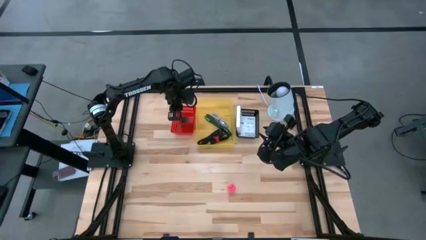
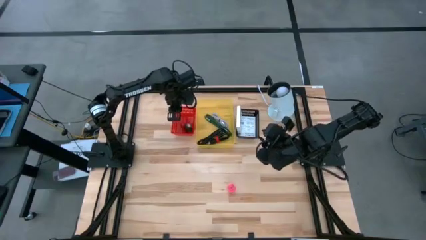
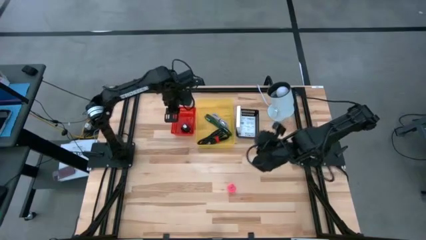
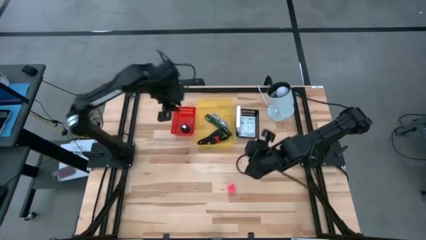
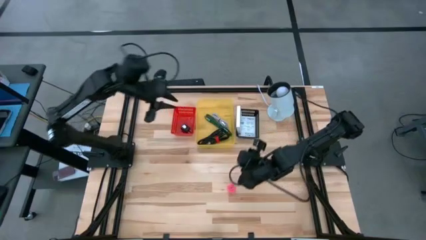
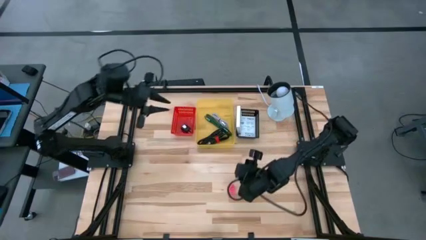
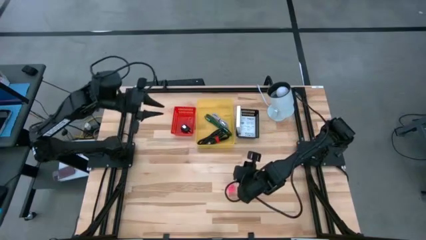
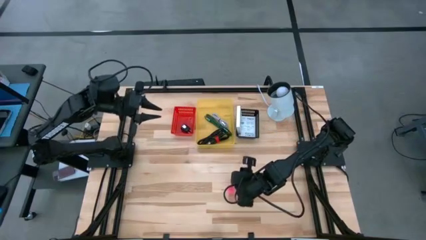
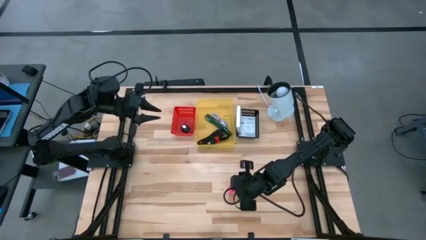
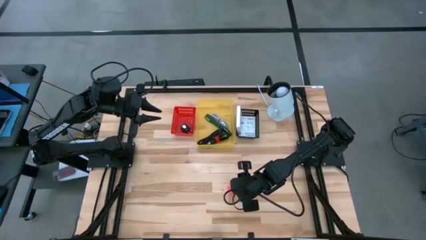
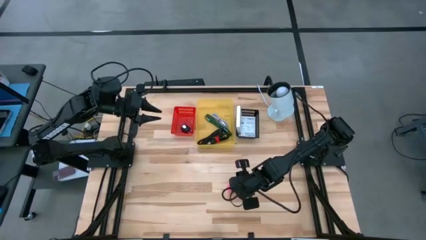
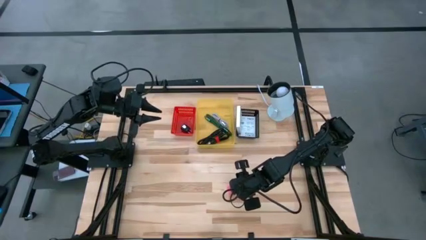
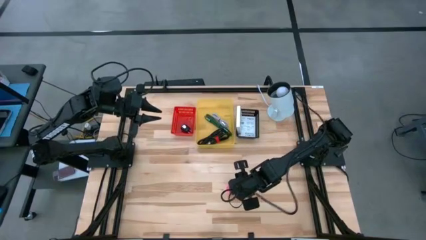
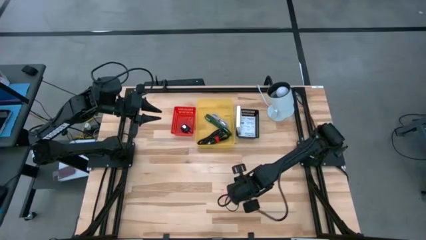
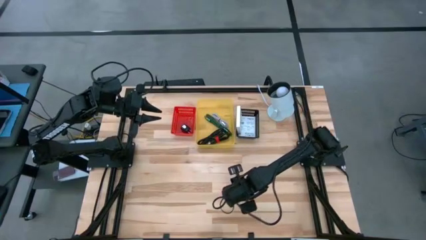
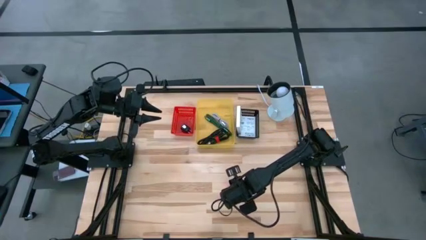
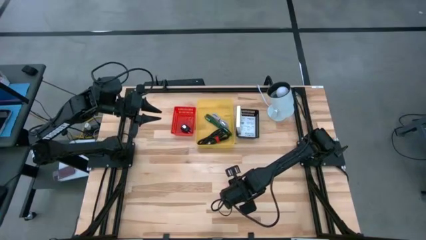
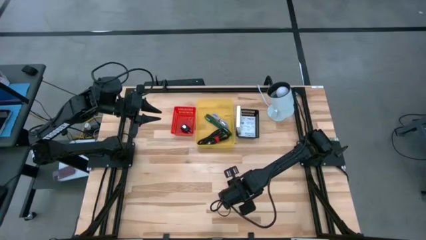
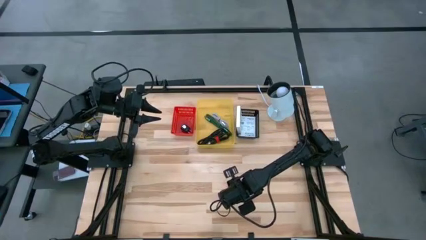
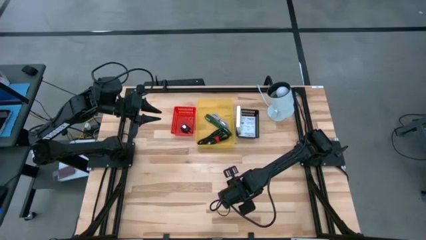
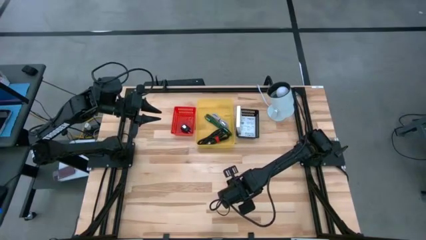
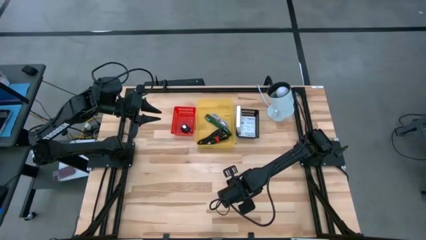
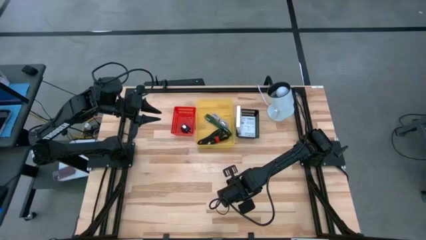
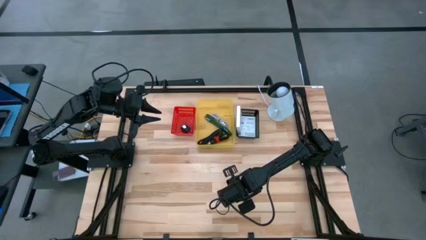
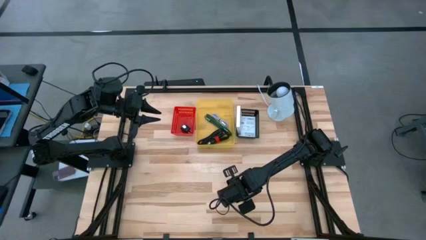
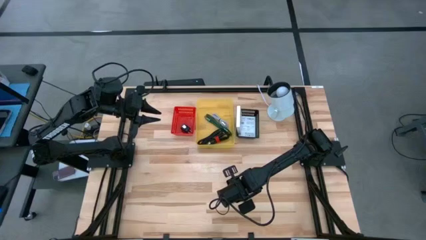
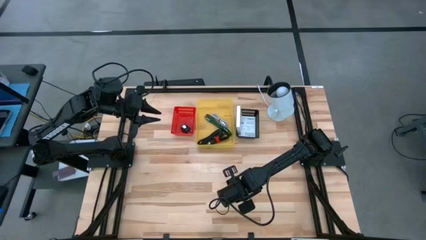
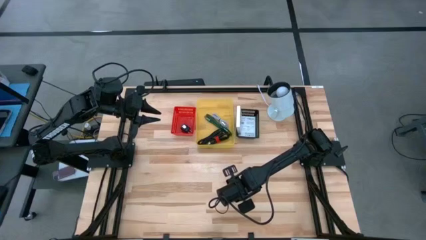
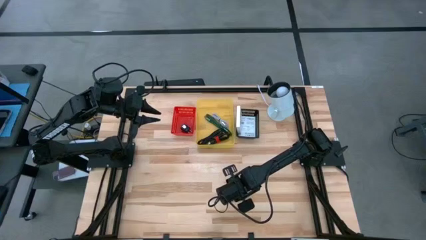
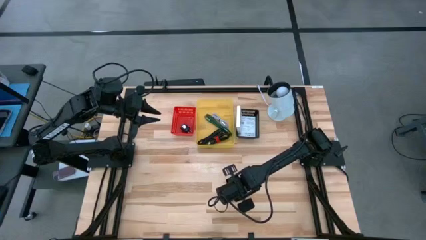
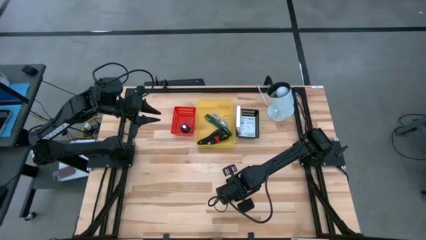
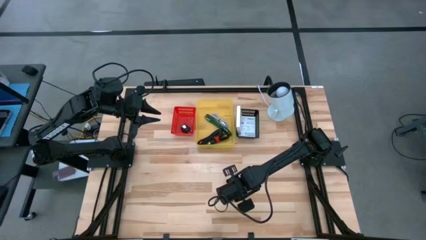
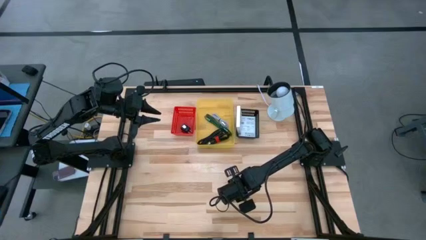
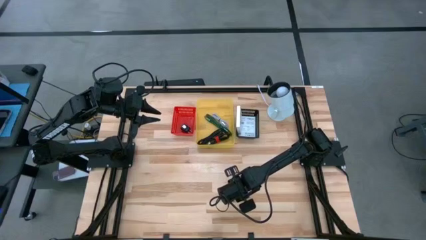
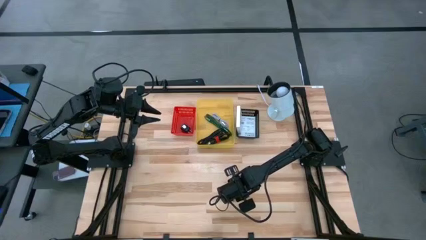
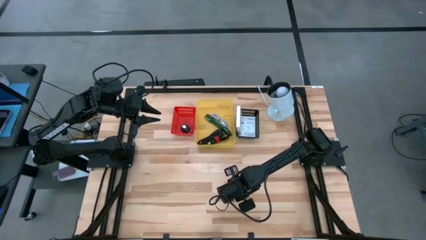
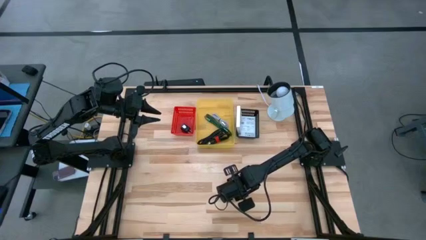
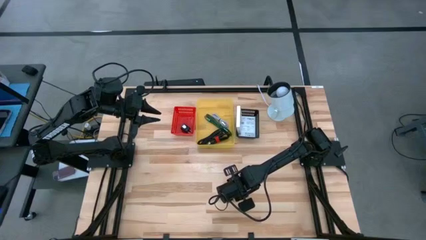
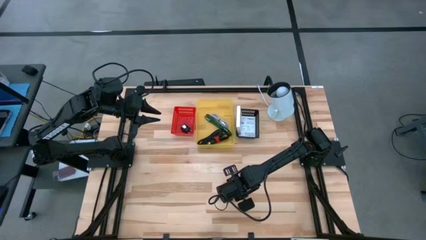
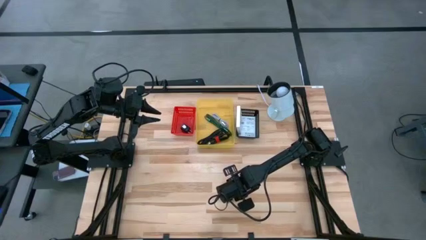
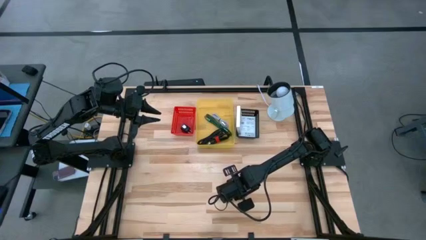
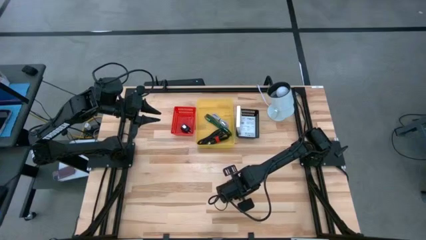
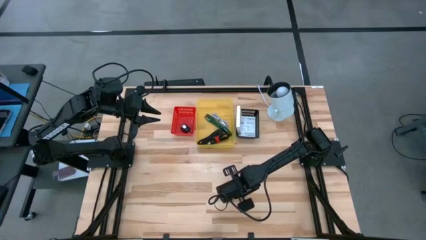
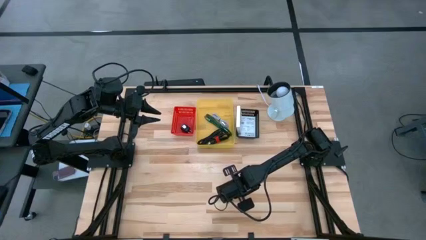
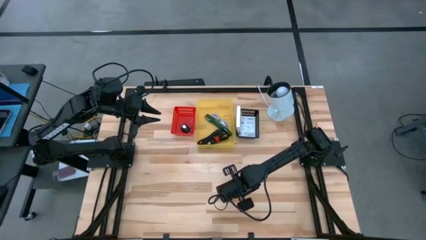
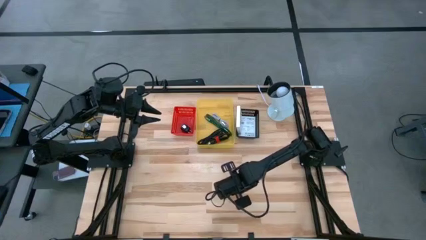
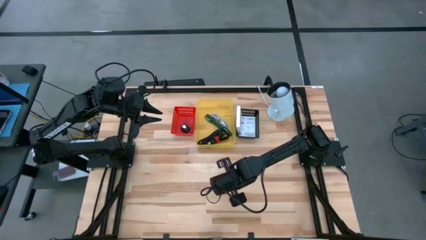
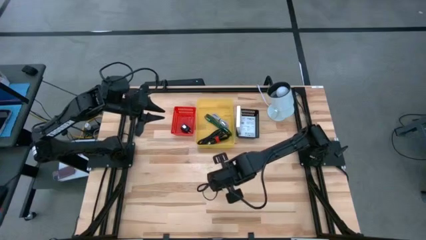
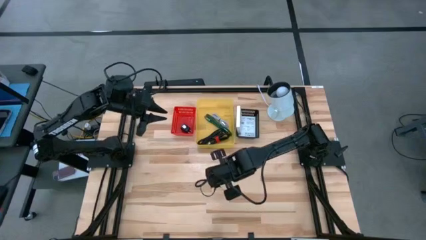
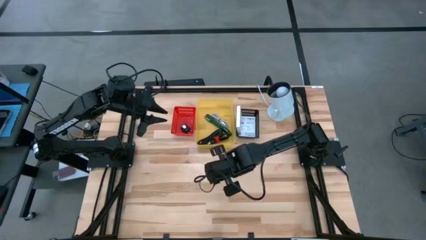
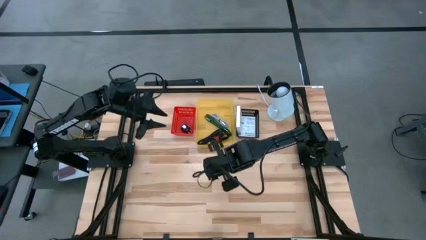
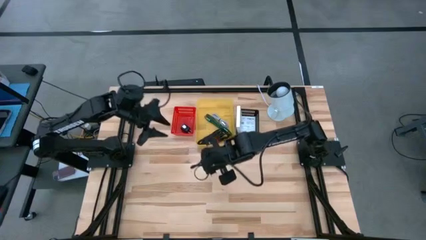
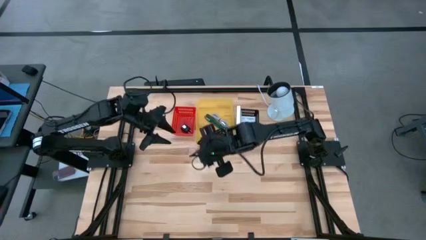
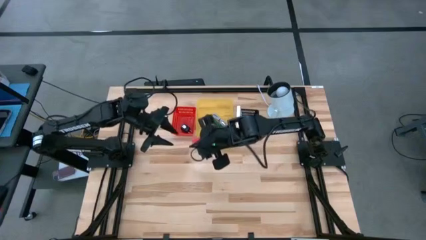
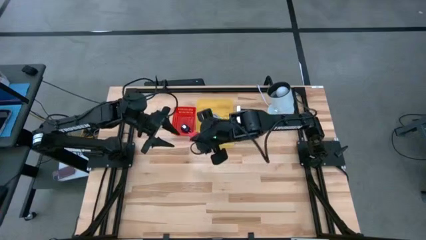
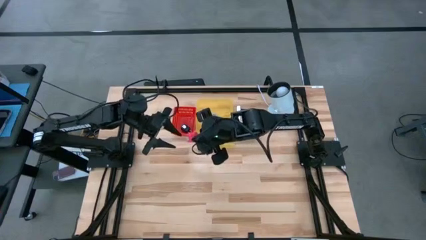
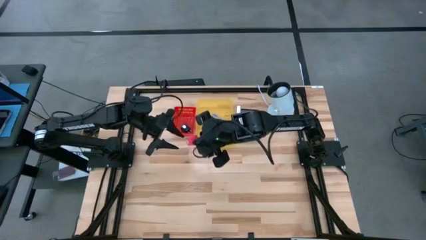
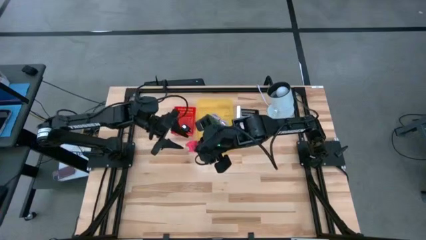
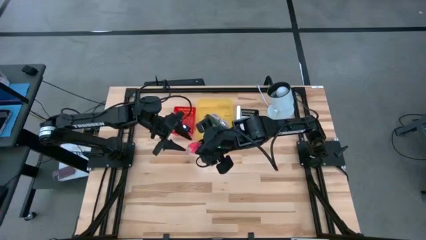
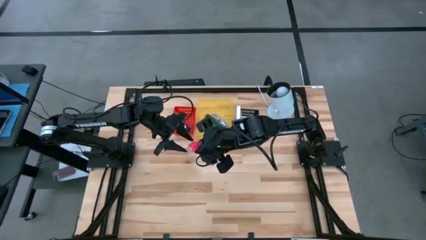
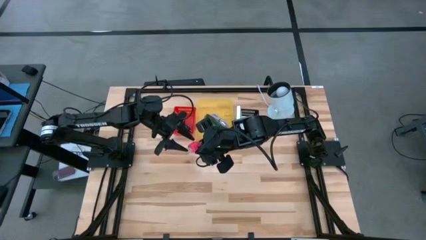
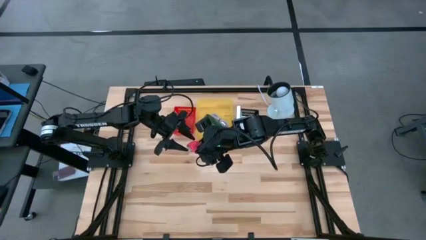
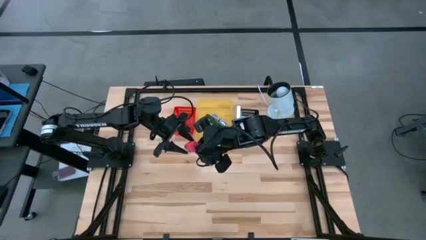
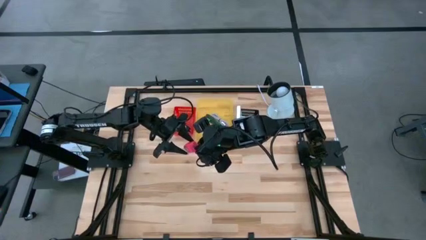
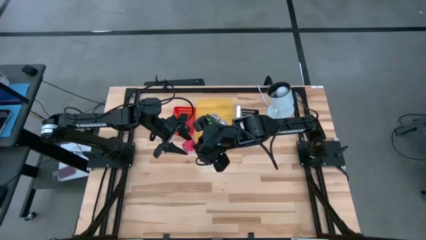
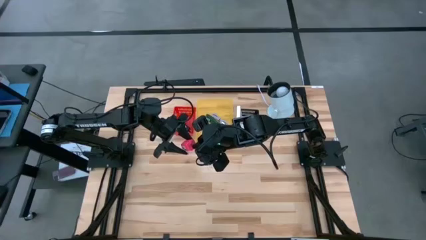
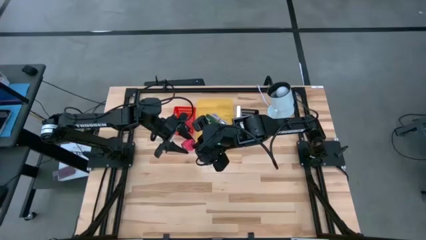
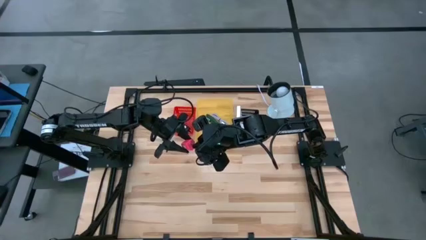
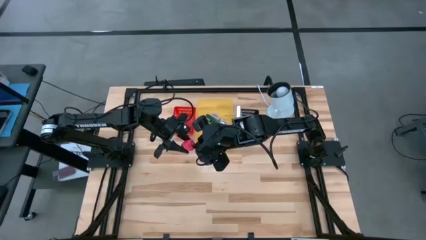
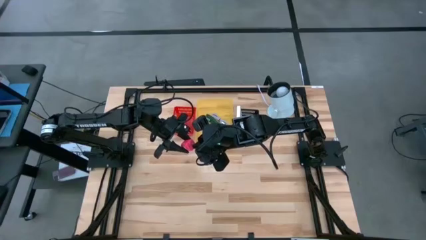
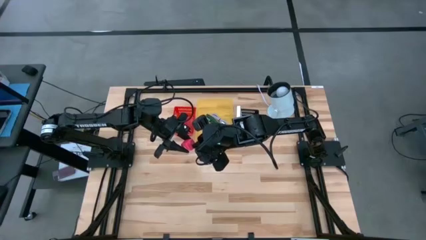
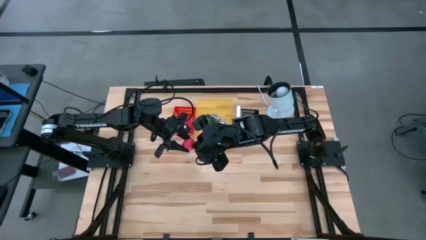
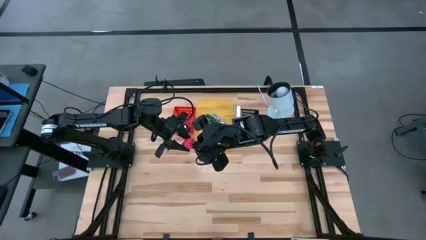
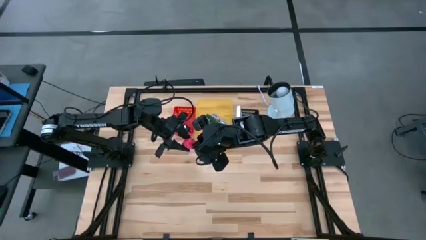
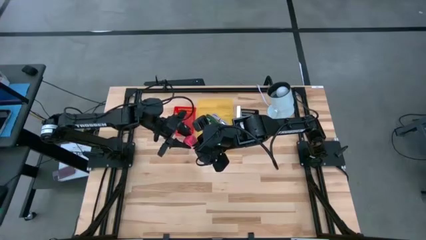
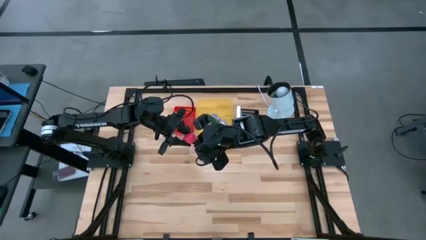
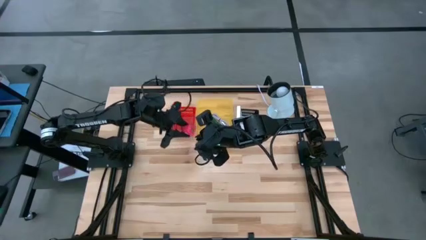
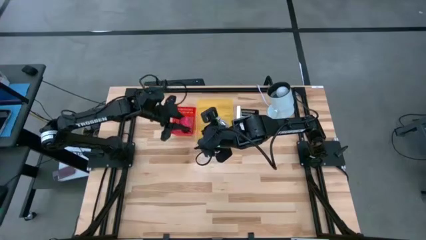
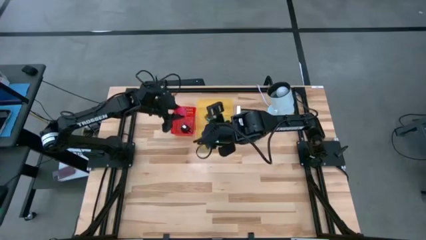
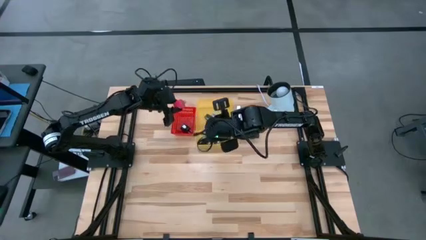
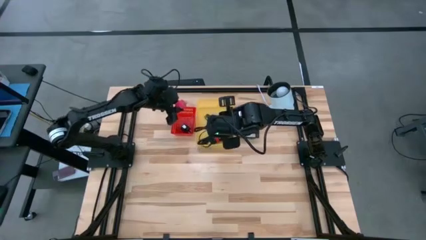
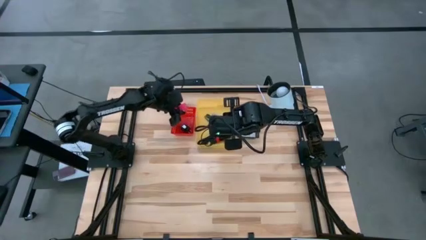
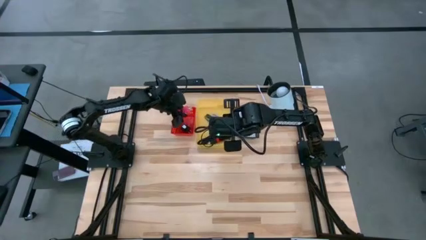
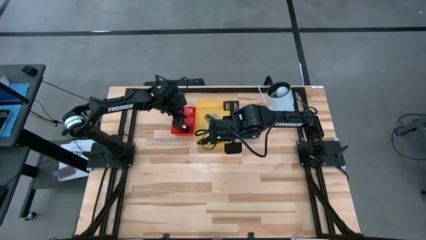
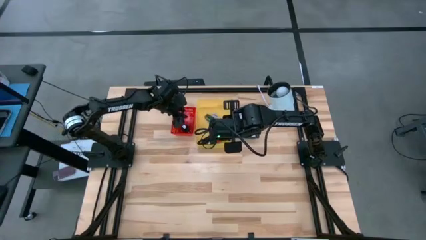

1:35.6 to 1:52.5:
Task: Pick and place items into bin
Put the pink charger adapter into the red bin
